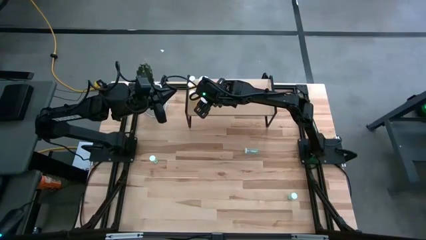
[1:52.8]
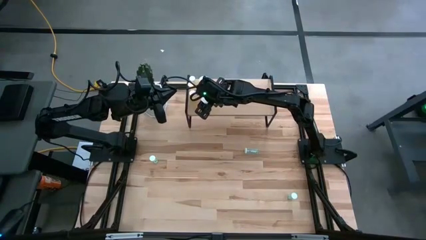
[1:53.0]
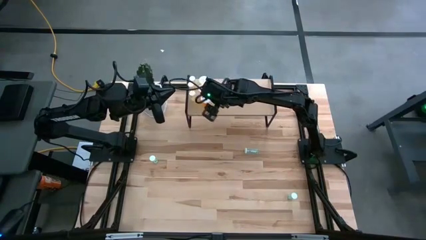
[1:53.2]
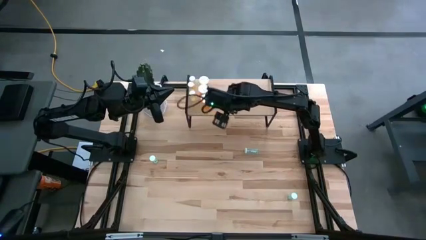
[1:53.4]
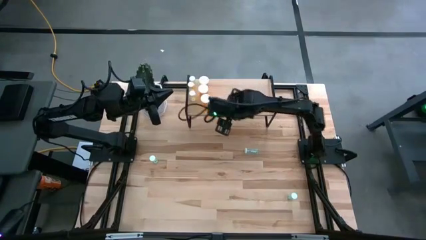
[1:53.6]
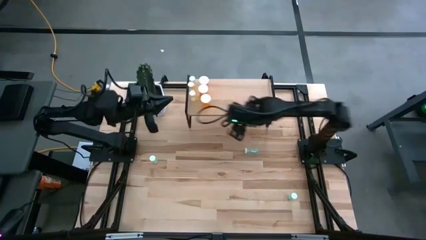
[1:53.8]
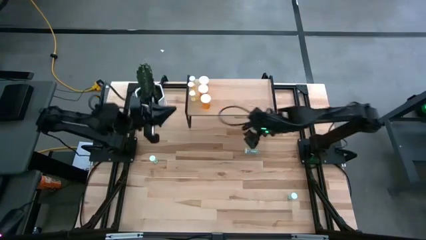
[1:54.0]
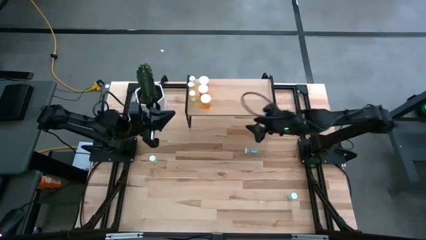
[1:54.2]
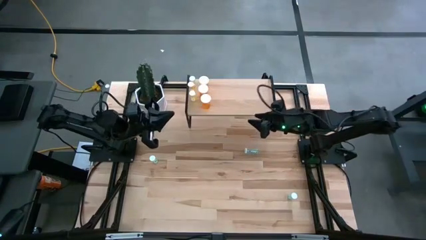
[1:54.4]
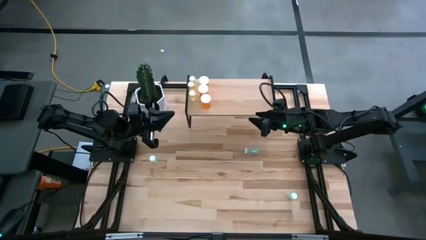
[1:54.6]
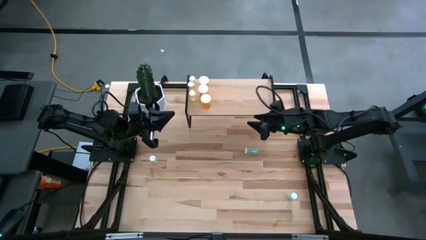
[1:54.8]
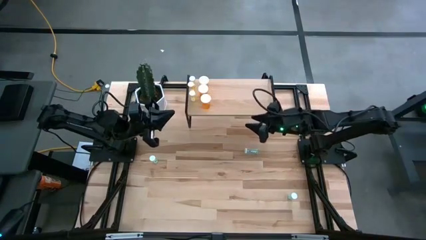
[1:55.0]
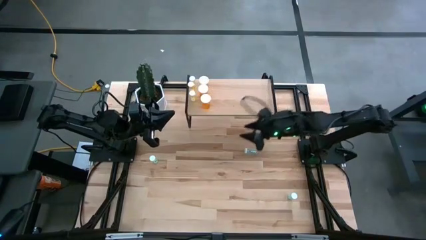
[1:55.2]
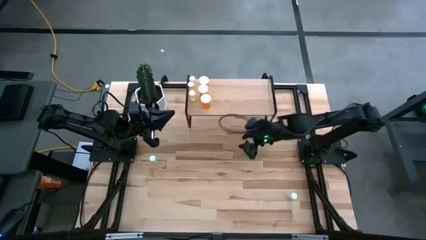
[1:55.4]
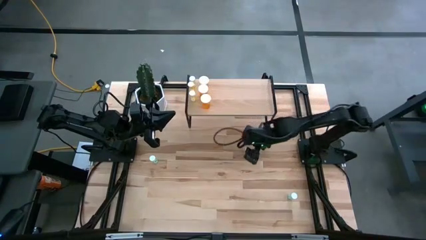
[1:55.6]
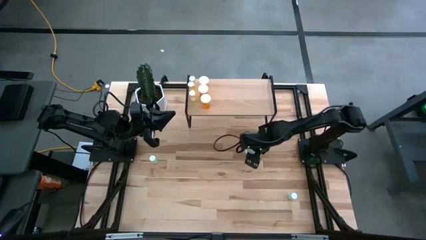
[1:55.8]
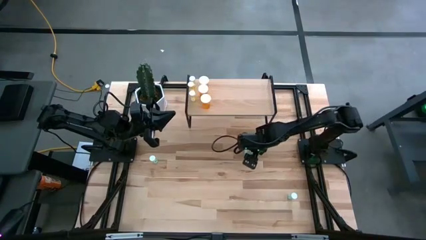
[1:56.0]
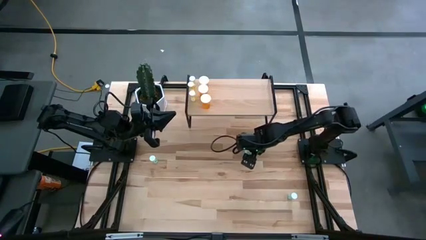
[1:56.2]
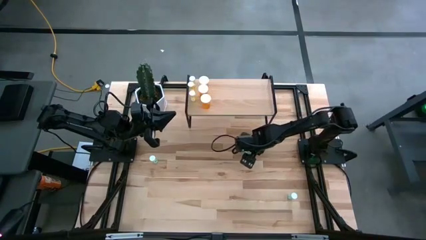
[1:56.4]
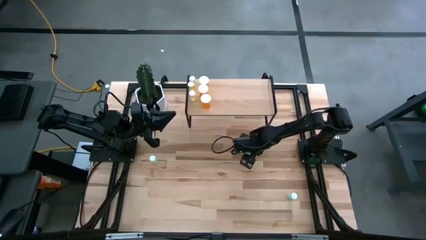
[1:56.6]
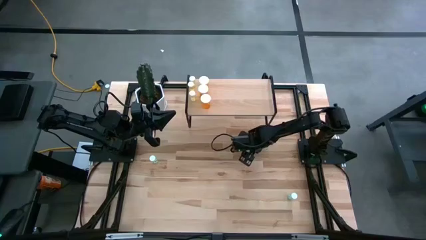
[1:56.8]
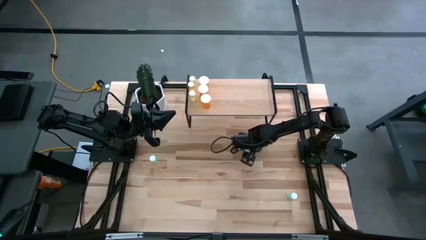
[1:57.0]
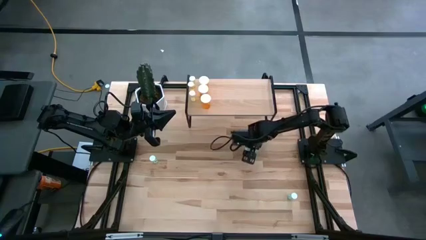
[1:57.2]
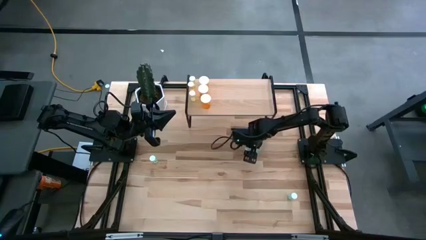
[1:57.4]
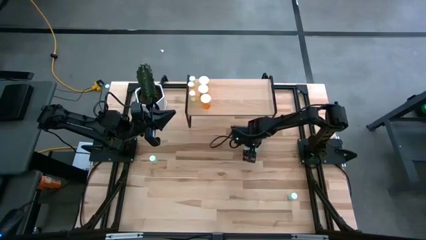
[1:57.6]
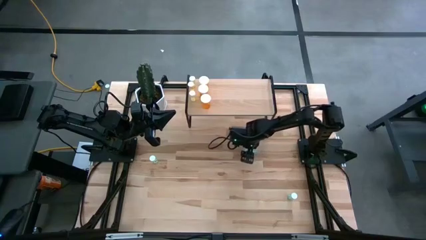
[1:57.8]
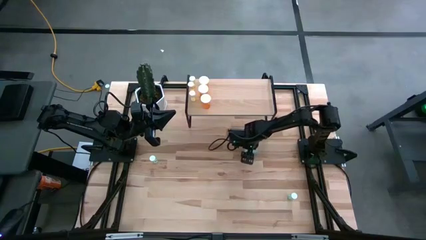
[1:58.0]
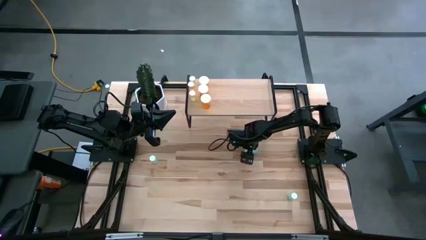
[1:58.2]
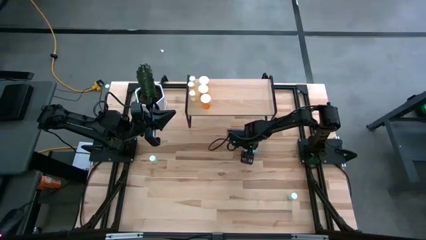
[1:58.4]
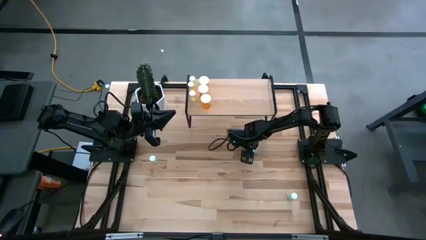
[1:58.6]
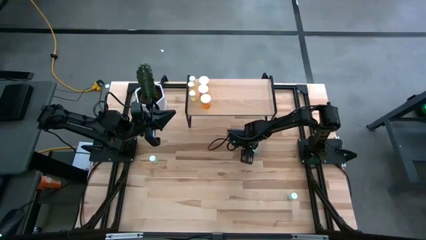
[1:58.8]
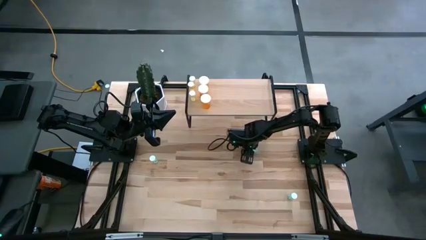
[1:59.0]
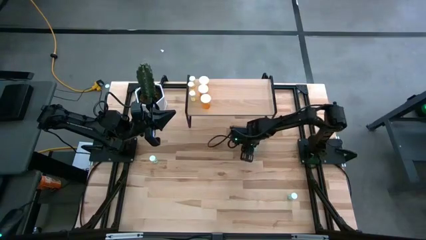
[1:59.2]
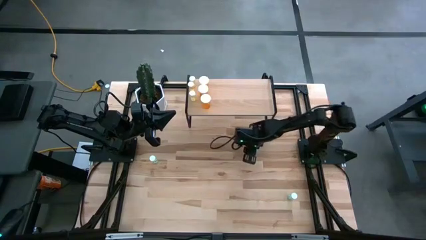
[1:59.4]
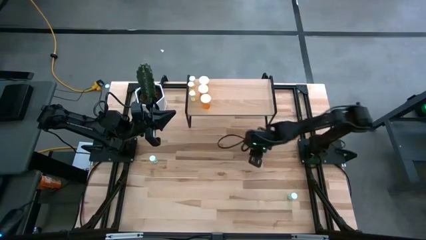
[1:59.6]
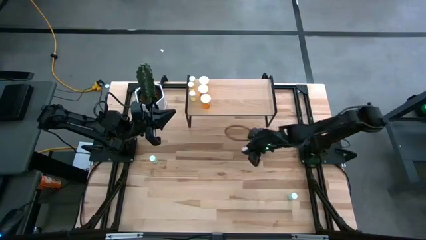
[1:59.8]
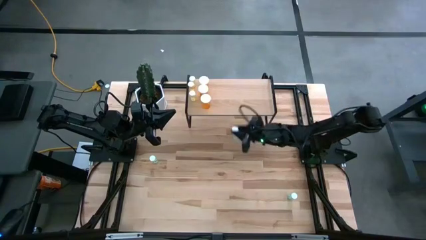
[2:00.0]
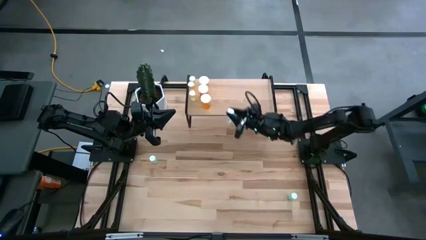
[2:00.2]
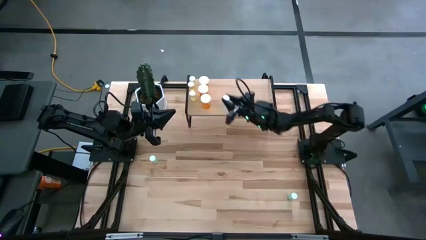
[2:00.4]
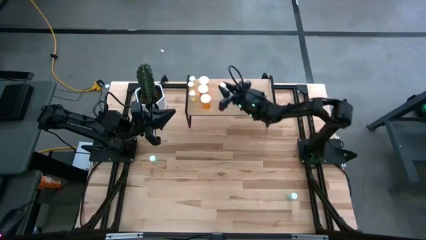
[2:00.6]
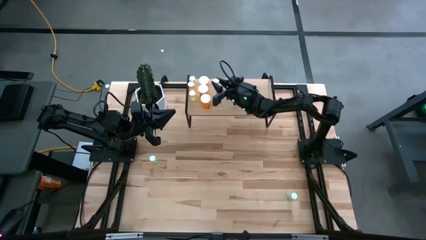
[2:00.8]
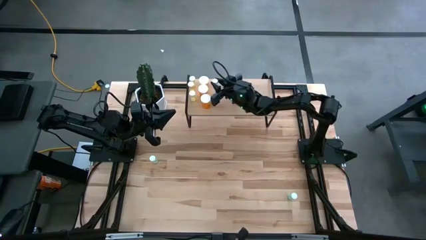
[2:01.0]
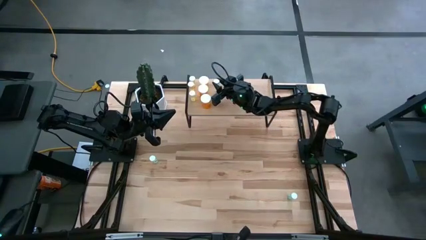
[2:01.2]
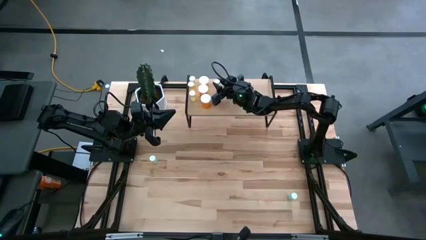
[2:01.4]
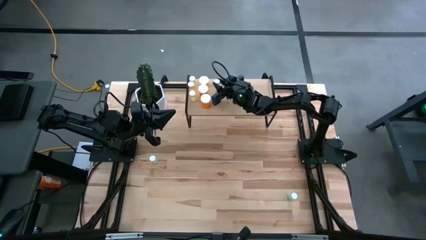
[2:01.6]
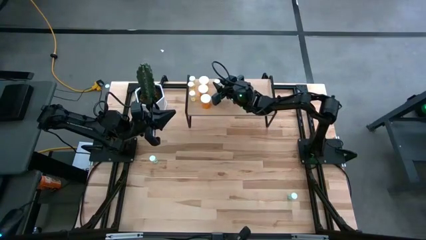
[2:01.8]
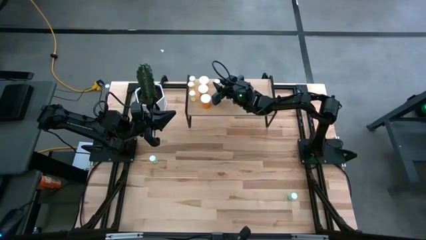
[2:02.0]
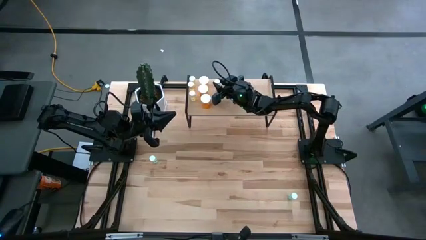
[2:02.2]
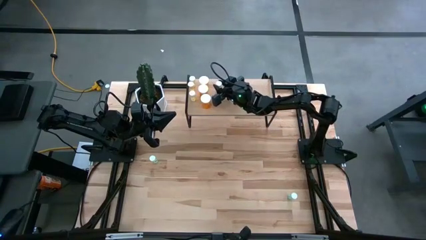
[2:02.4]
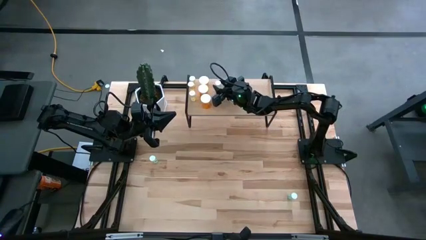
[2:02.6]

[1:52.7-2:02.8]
Task: Pick and place medicine bottles onto shelf by color
Put the top right blue pill bottle on the shelf

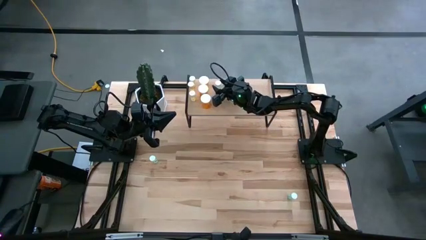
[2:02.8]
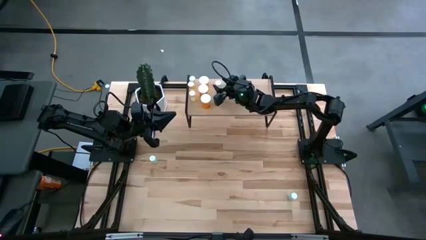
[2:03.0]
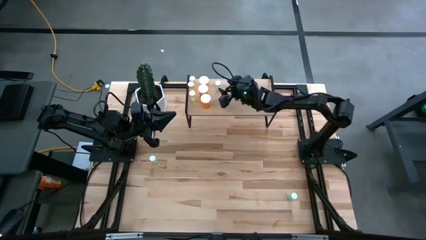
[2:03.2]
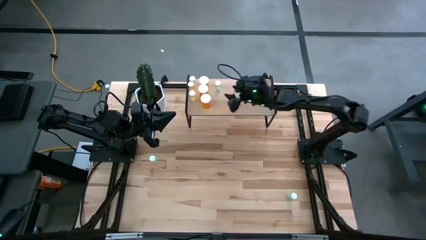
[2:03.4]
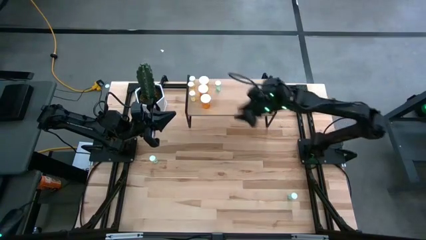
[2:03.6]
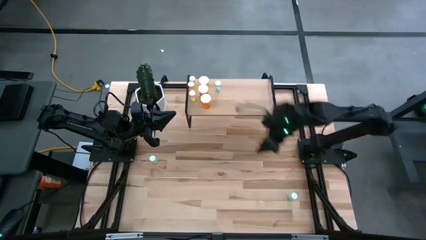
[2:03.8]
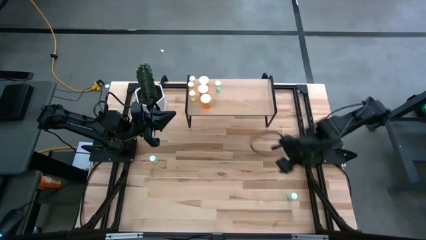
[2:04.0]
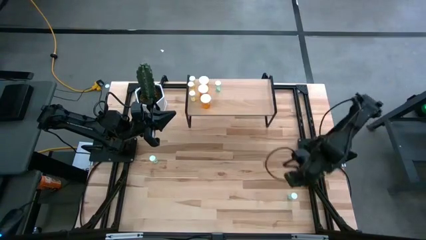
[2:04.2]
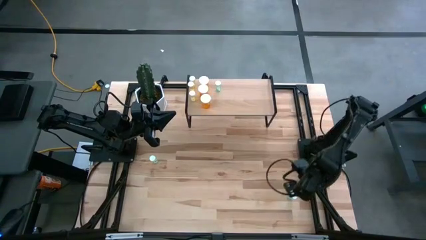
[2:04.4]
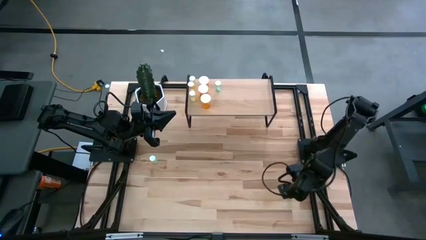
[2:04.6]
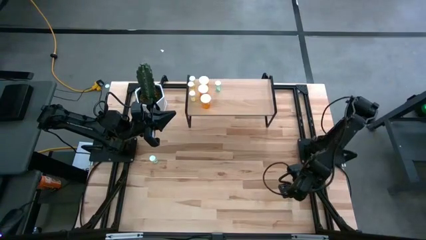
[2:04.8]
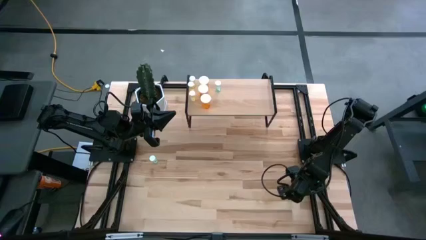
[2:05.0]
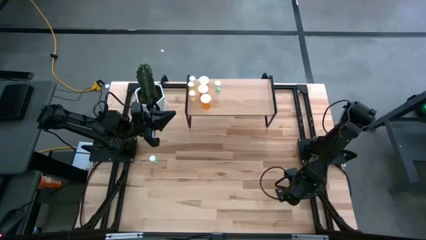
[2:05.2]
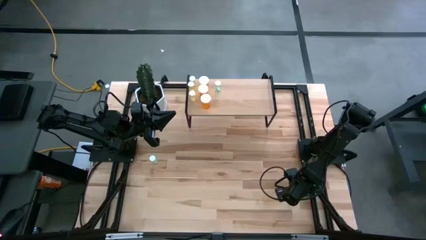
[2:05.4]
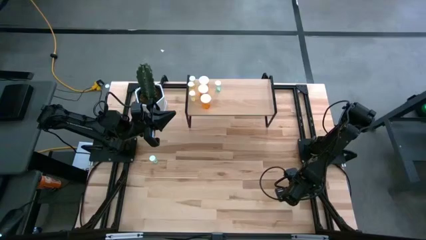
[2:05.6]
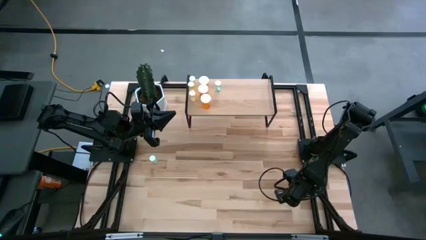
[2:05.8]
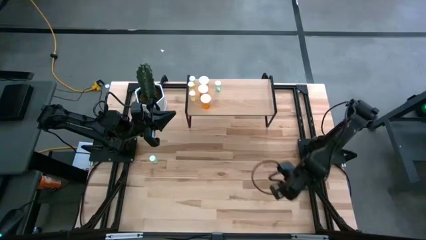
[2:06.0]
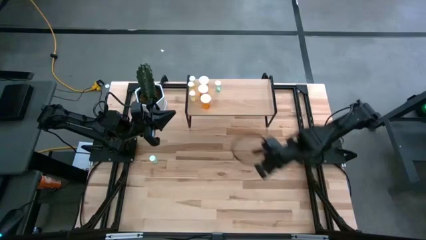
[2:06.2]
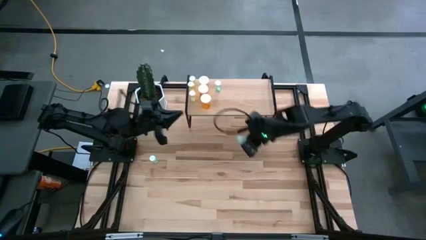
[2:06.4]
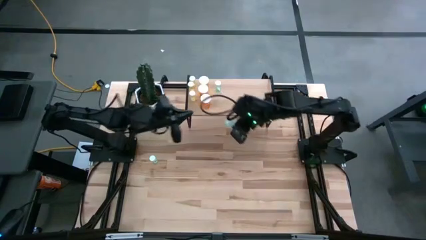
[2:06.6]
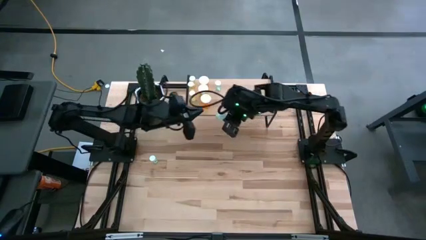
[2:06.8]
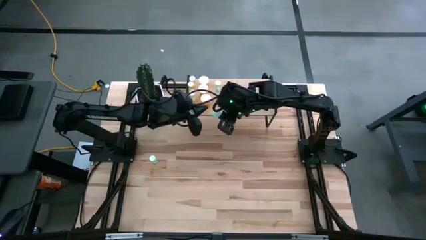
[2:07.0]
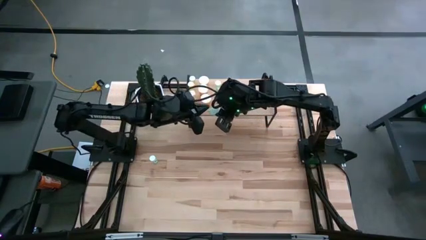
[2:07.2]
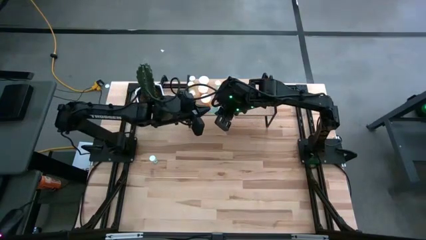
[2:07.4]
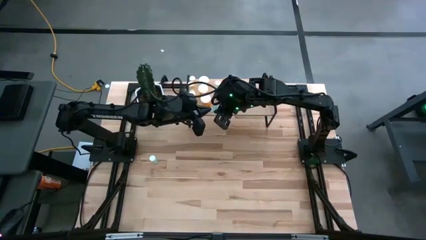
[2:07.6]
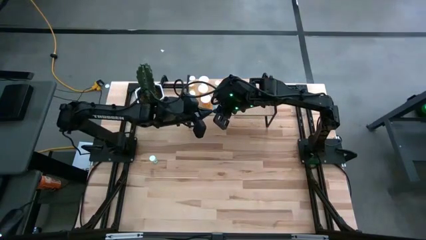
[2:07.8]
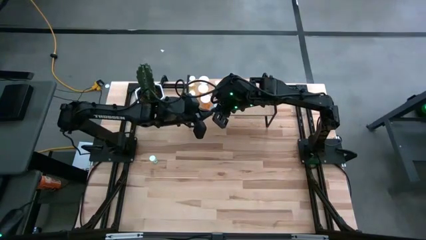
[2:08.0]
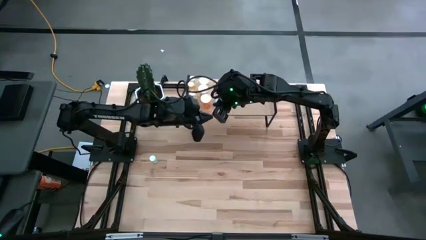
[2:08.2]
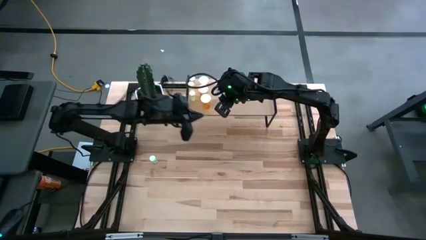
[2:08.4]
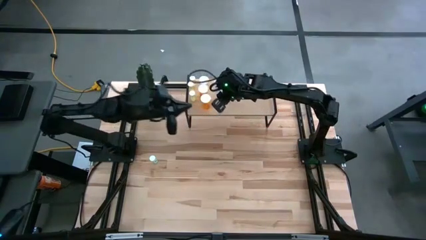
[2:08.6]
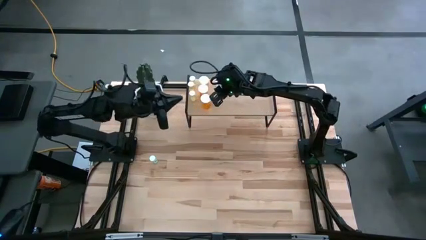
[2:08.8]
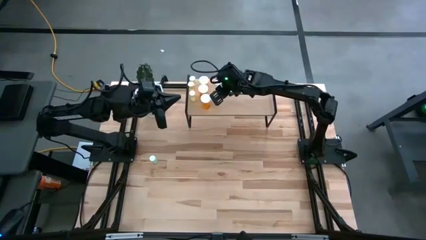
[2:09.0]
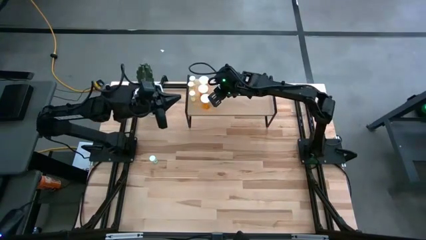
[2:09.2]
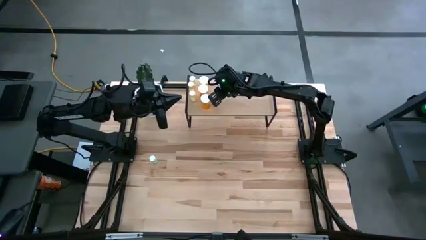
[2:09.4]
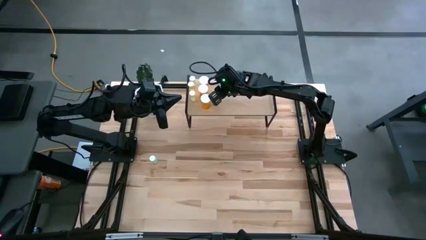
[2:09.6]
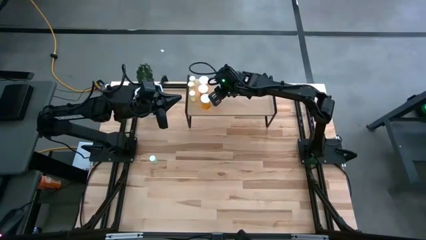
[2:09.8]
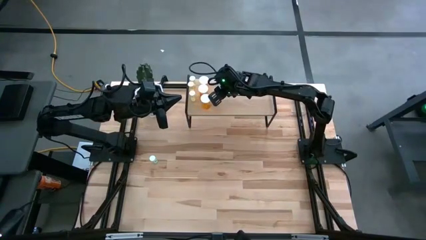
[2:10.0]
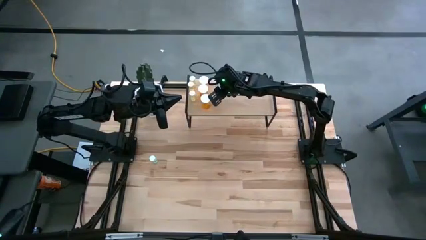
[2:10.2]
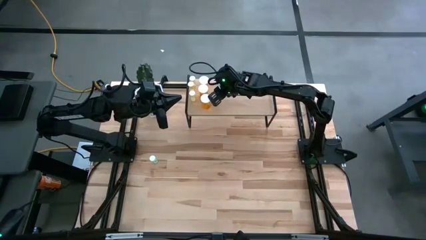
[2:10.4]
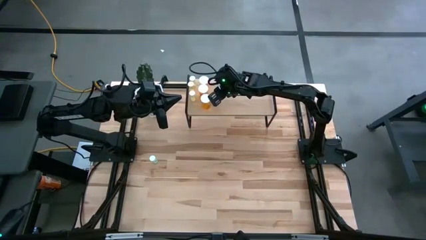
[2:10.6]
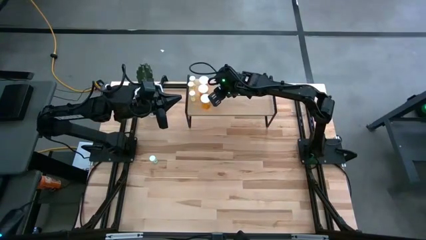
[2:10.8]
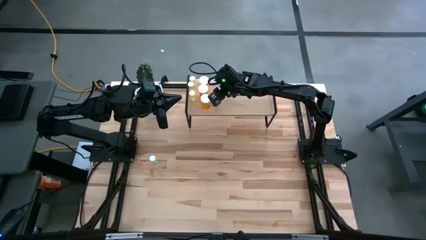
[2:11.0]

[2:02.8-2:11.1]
Align the bottom blue pill bottle with the other blue pill bottle on the shelf
